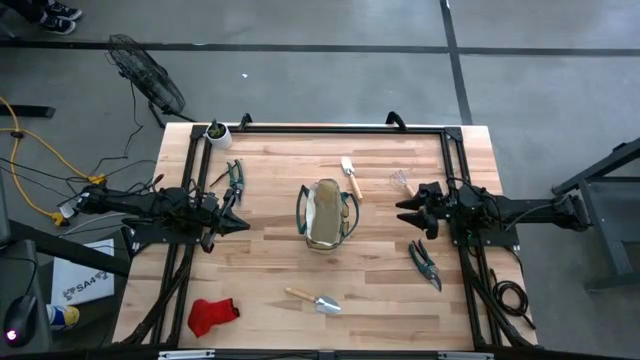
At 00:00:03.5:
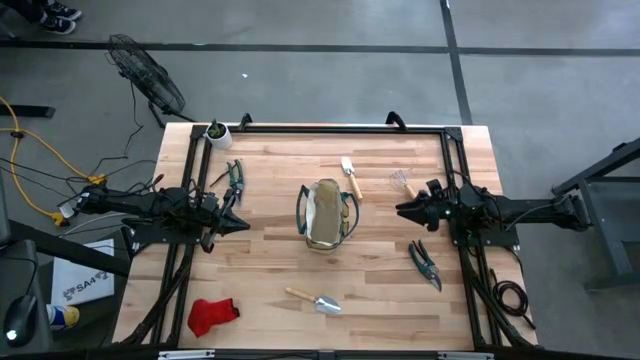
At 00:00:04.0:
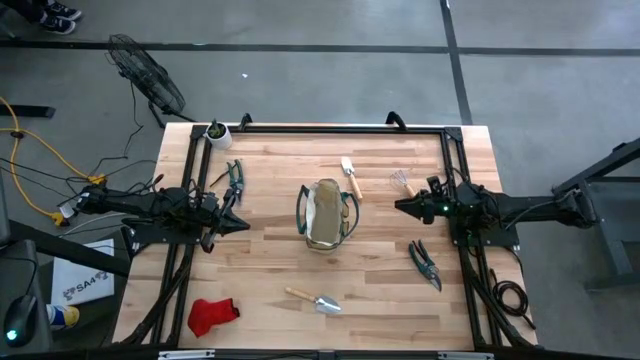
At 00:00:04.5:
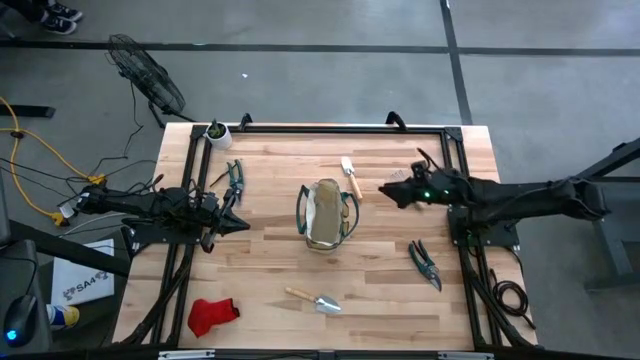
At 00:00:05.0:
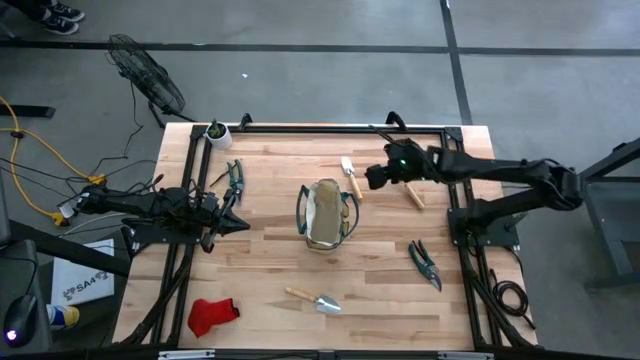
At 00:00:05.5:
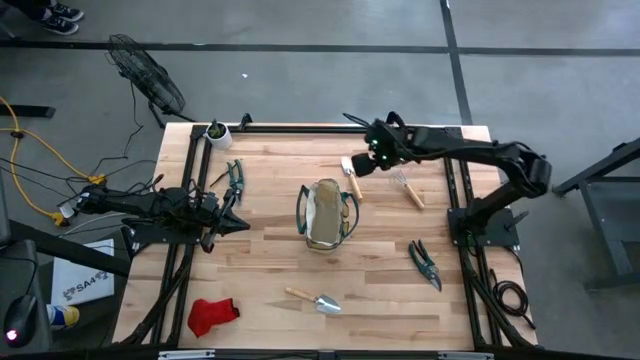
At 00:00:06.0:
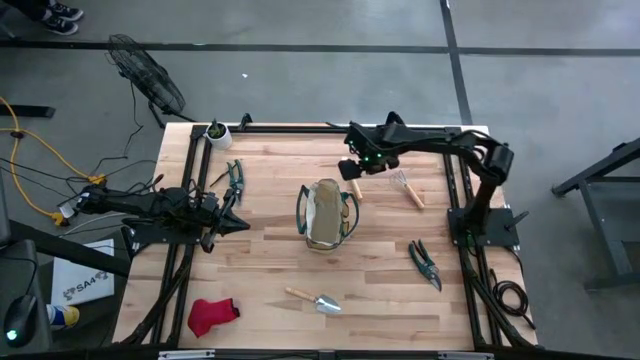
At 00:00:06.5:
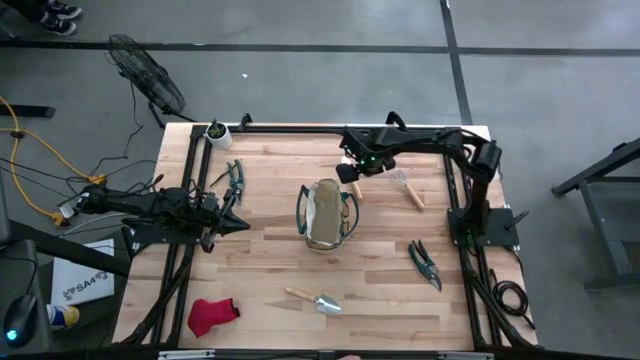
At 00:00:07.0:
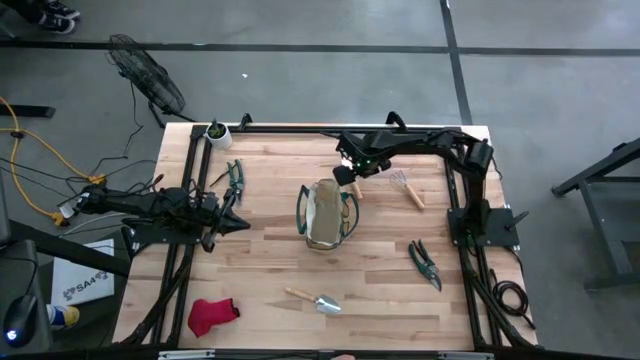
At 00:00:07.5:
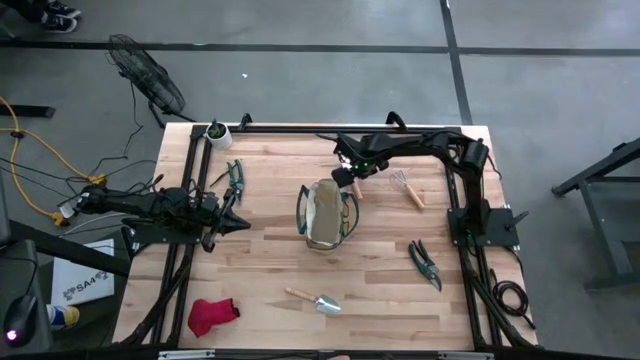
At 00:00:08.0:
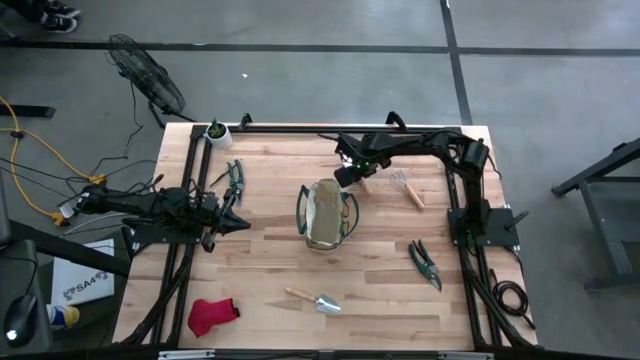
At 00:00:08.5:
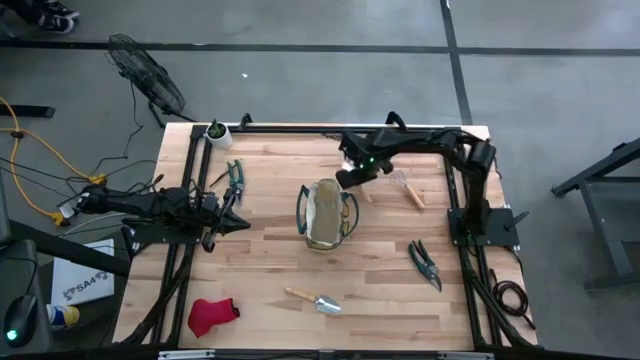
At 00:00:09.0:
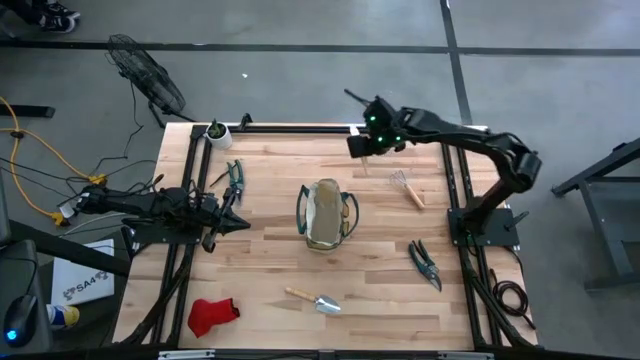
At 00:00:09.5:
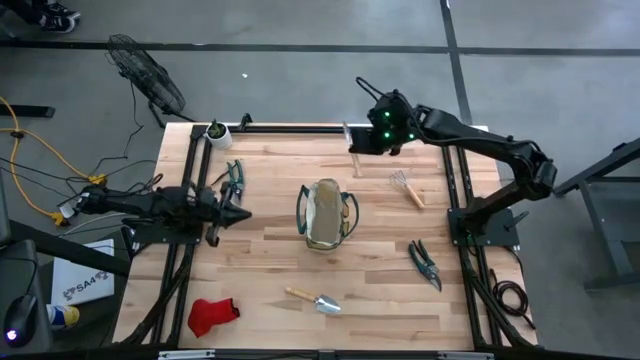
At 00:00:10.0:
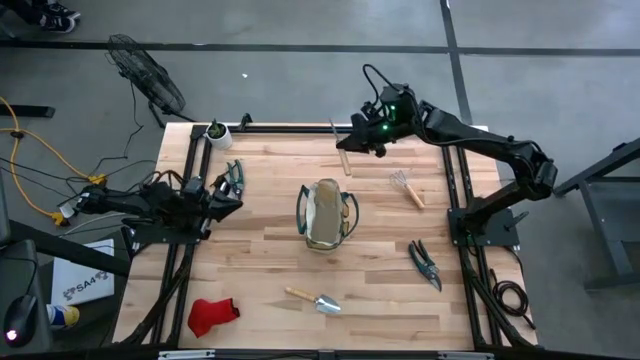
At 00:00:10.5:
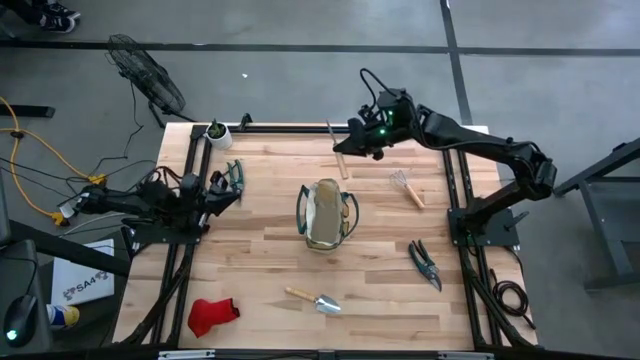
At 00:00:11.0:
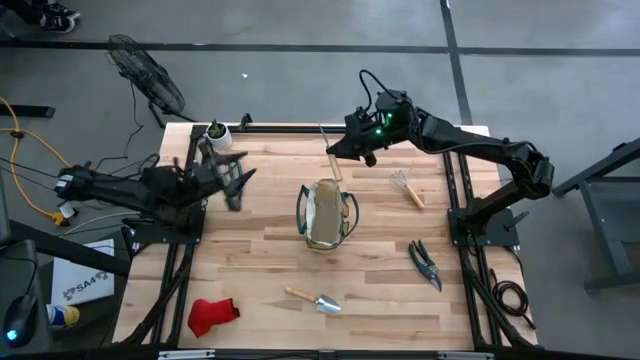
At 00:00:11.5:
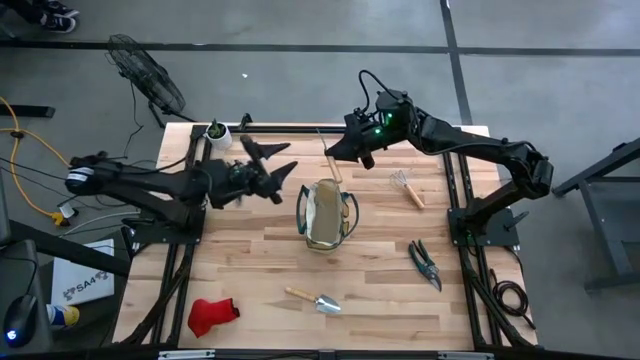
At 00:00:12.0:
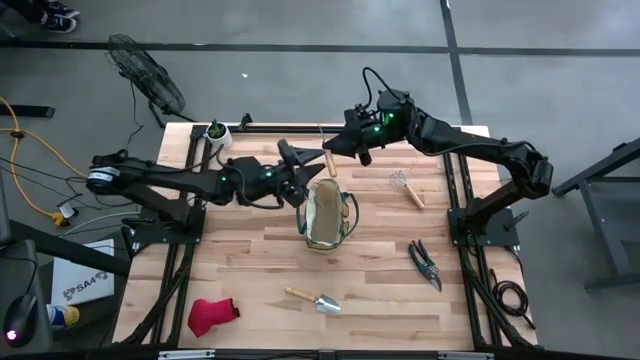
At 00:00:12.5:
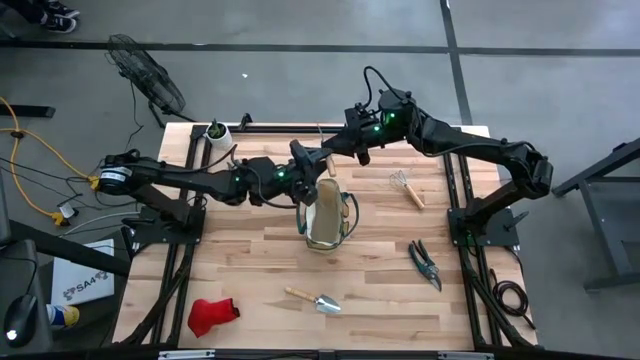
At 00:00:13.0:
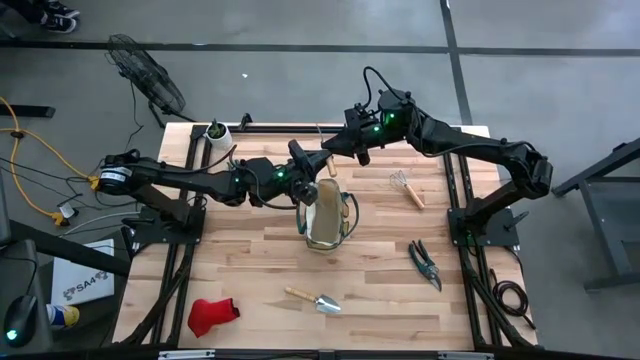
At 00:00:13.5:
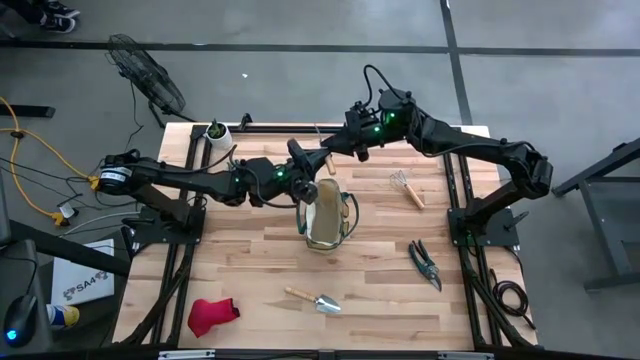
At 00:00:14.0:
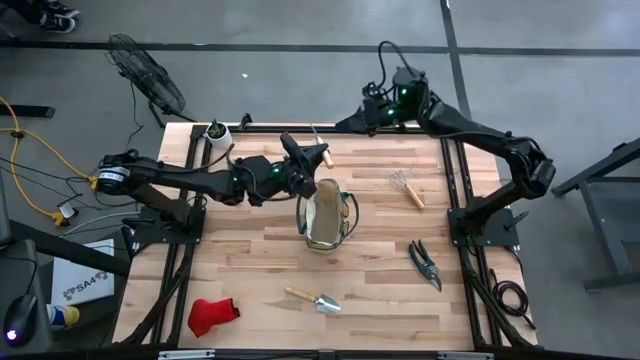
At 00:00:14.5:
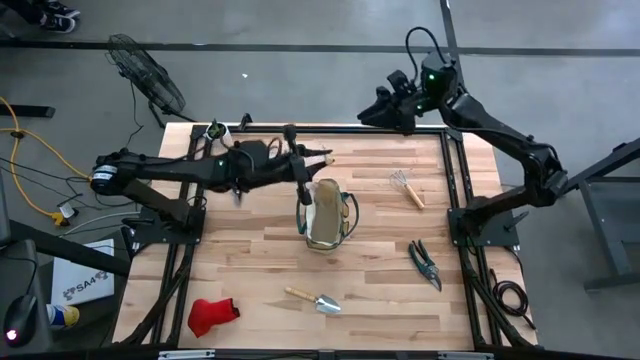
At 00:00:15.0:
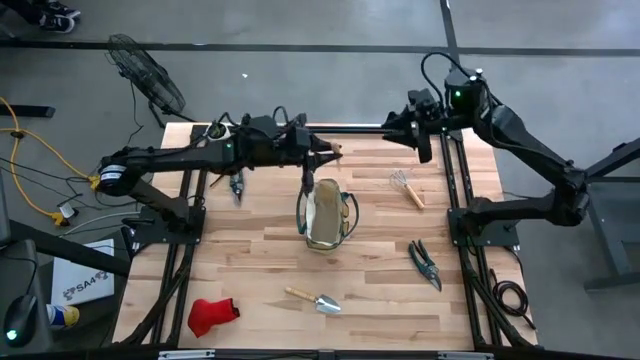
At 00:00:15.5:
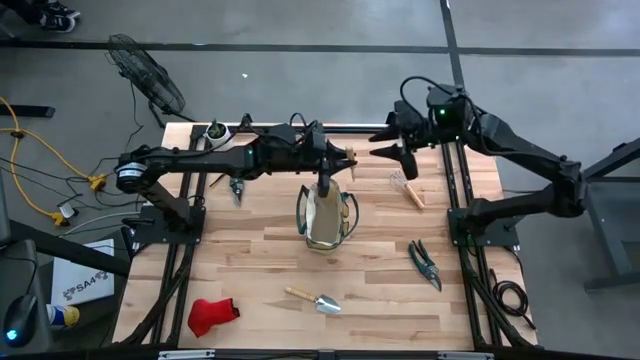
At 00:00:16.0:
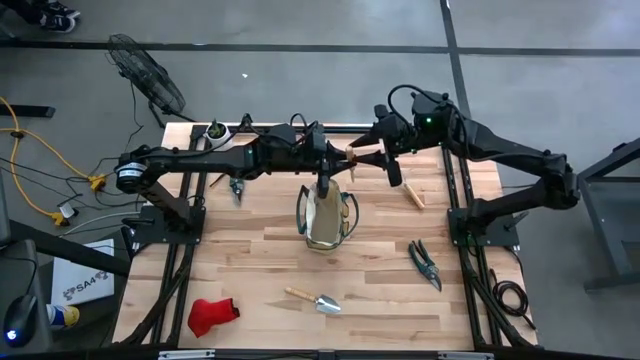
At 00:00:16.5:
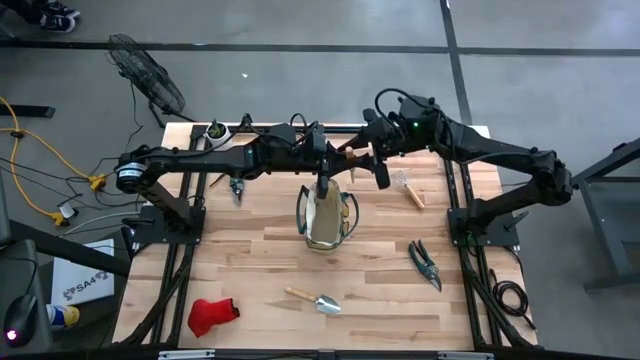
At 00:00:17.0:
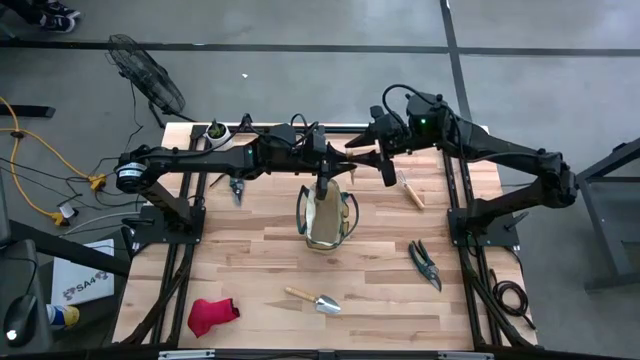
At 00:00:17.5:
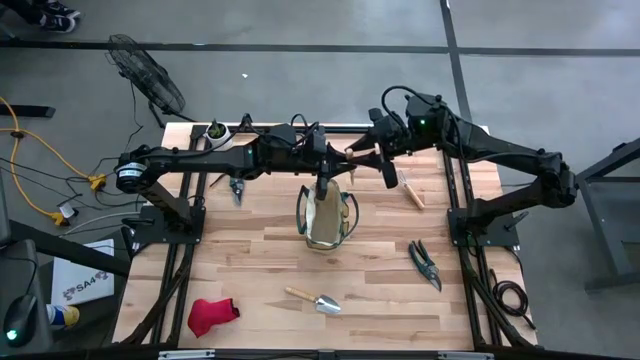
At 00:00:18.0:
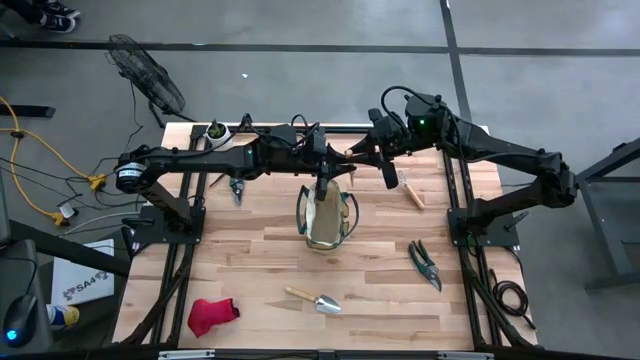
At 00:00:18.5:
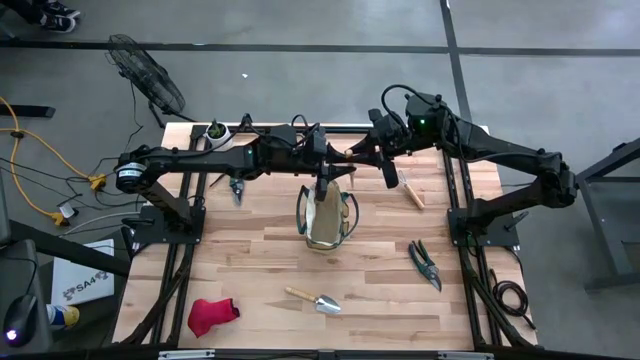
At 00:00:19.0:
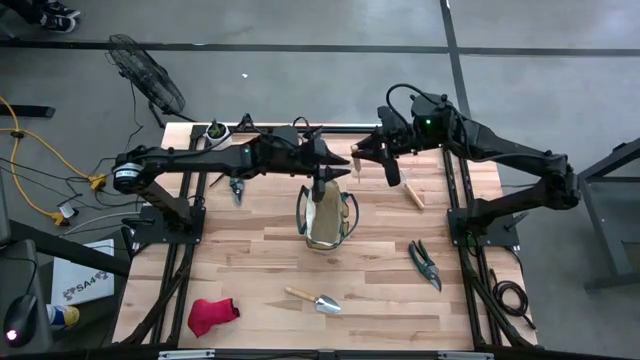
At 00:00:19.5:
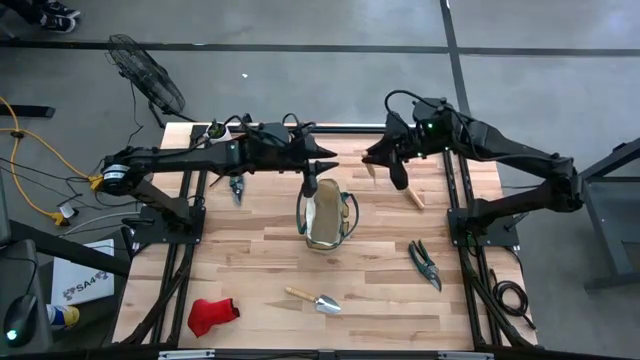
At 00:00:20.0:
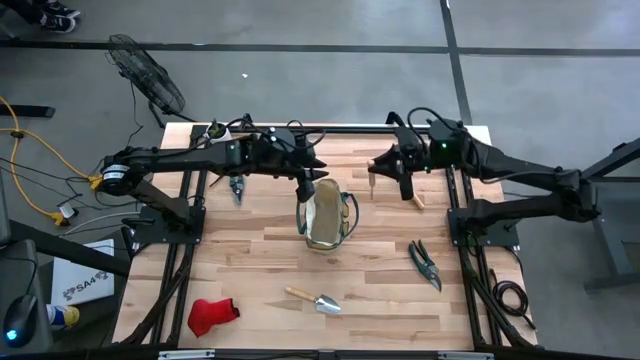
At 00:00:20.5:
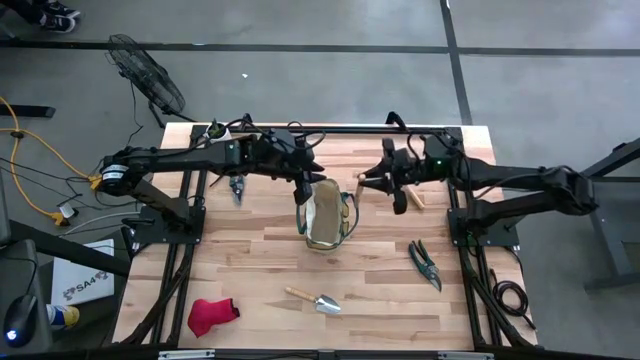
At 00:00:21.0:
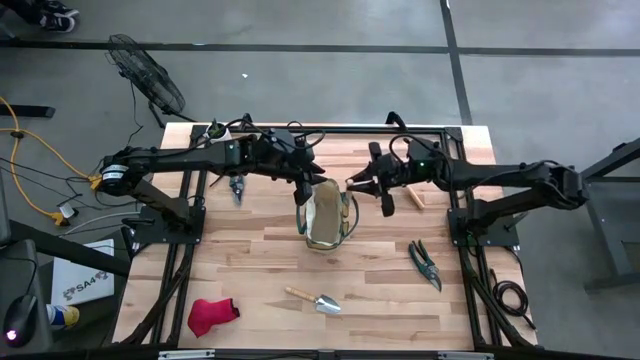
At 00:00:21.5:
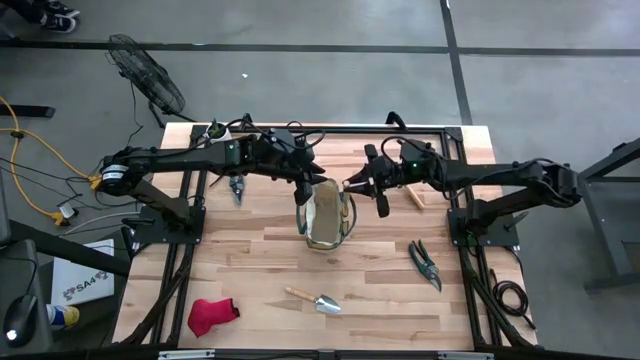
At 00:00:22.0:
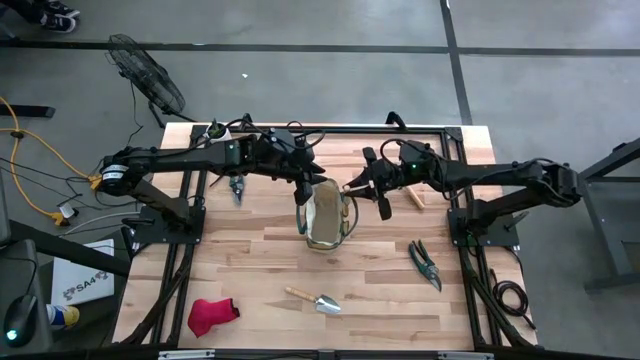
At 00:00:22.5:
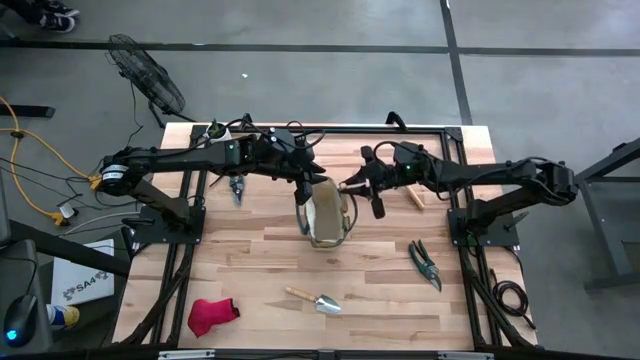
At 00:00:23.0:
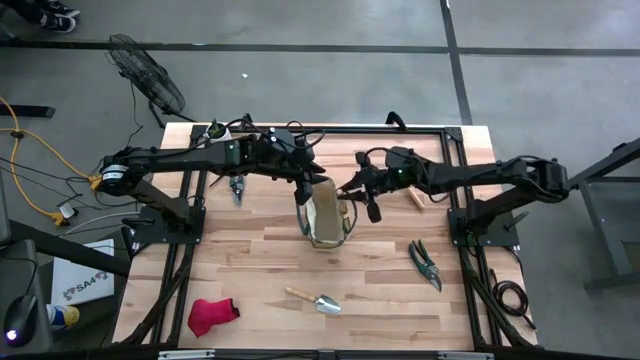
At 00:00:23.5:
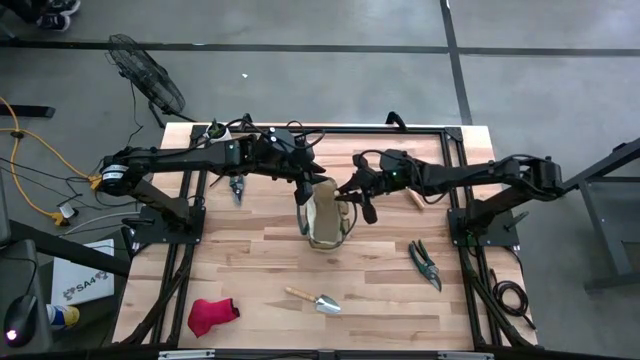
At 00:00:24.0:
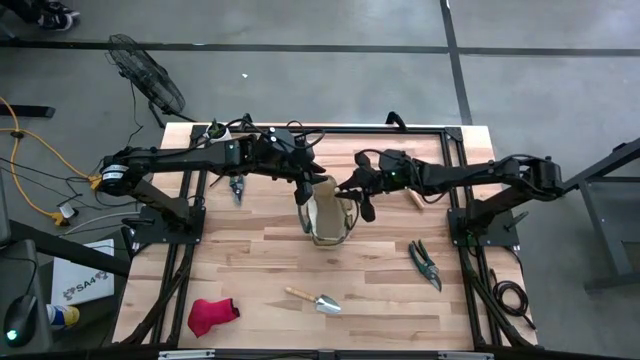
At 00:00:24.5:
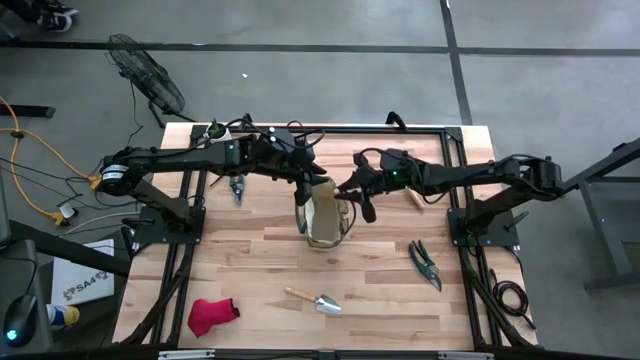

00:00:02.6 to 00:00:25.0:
Task: Pick & Place Garden tools in Gardening bag
Put the top trowel into the gardening bag
